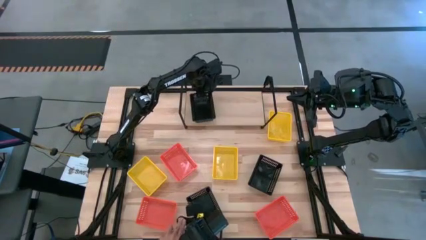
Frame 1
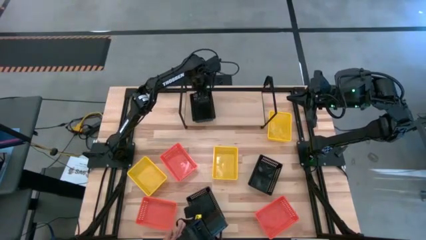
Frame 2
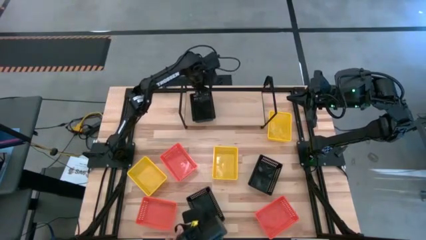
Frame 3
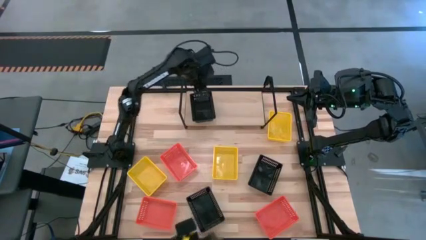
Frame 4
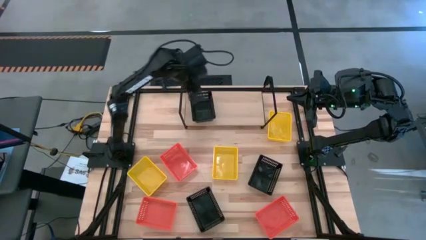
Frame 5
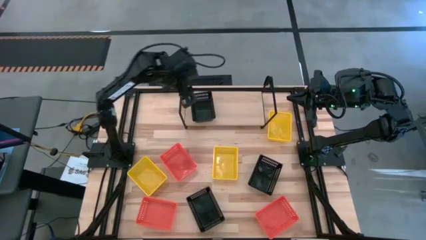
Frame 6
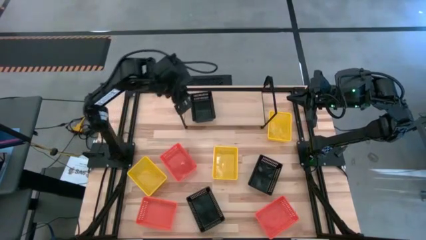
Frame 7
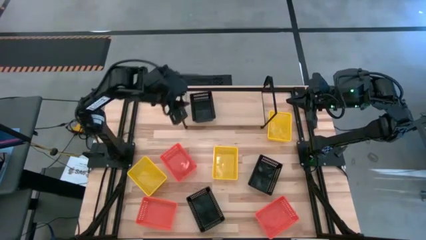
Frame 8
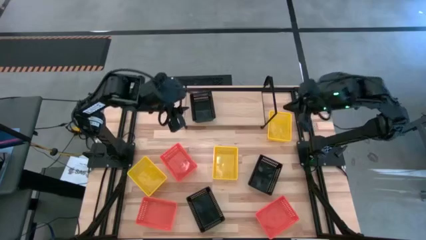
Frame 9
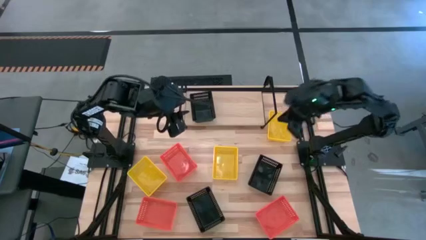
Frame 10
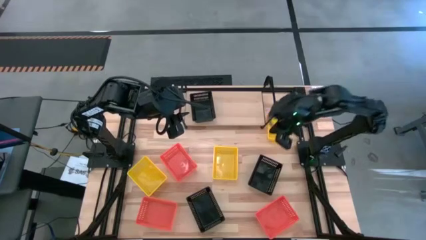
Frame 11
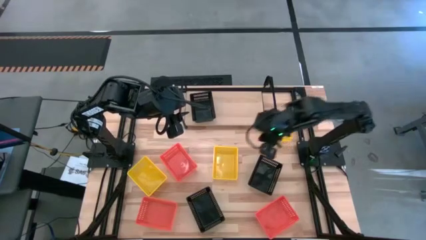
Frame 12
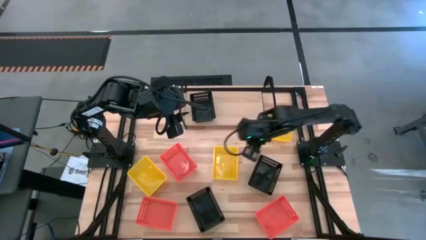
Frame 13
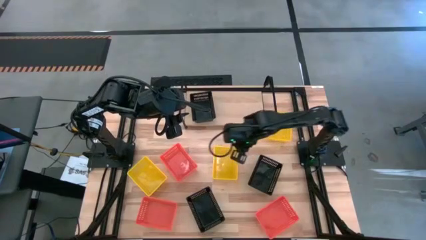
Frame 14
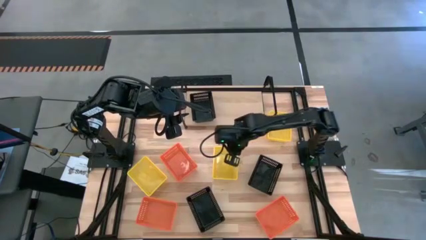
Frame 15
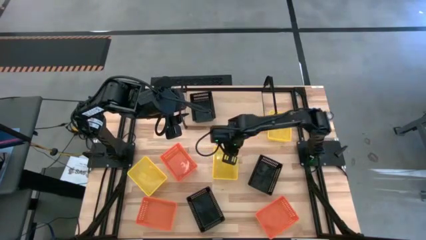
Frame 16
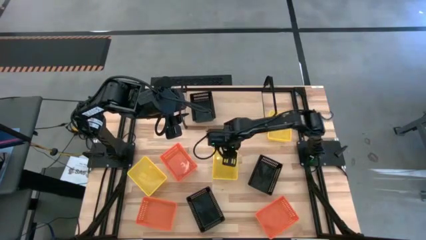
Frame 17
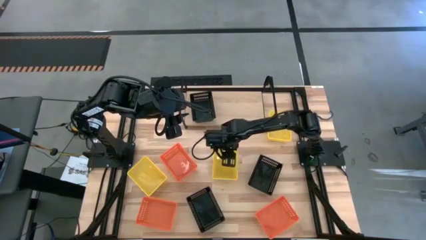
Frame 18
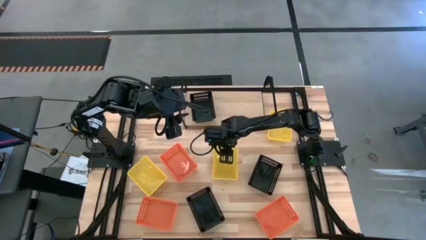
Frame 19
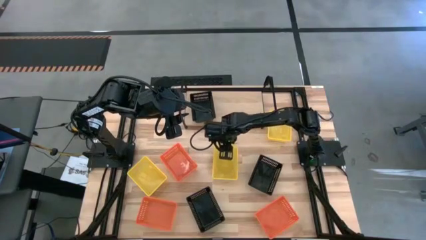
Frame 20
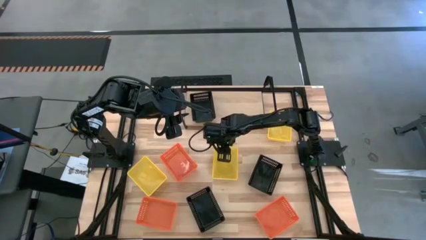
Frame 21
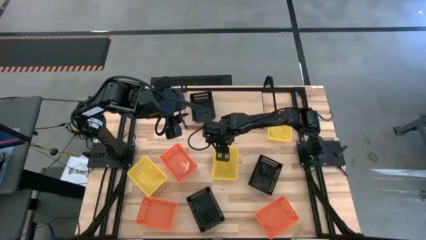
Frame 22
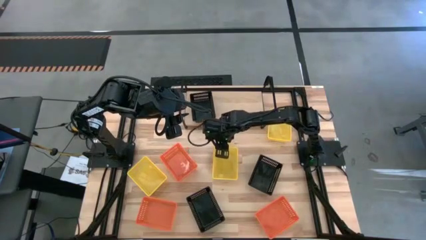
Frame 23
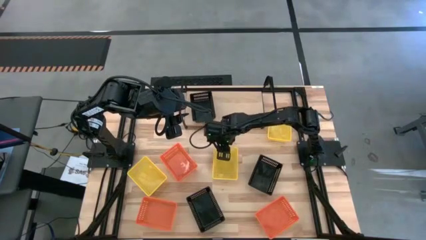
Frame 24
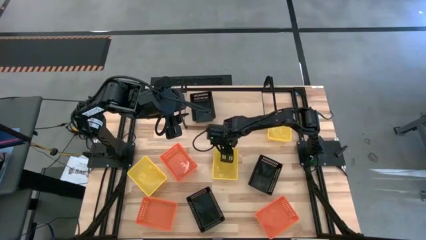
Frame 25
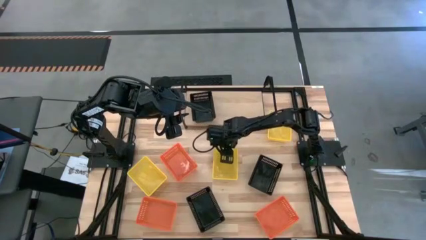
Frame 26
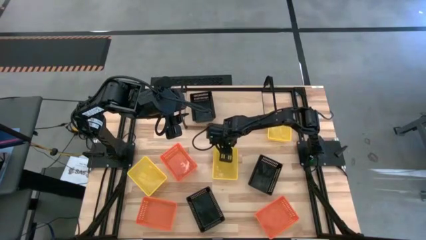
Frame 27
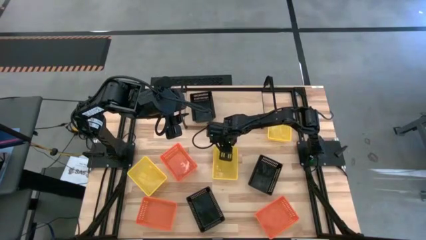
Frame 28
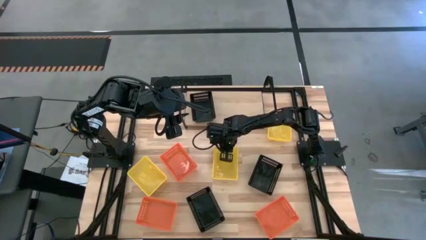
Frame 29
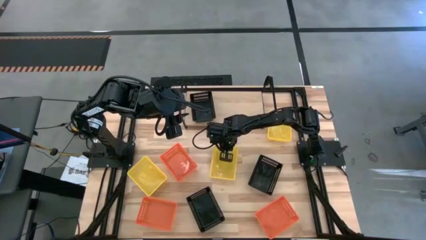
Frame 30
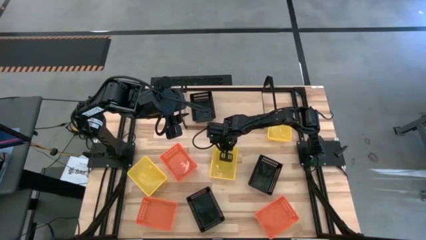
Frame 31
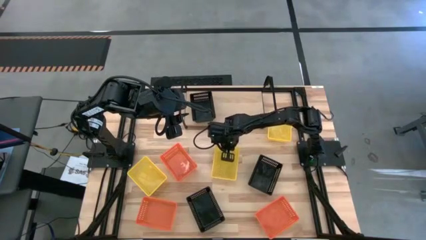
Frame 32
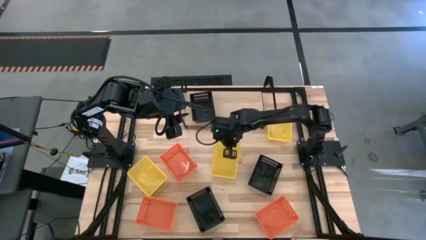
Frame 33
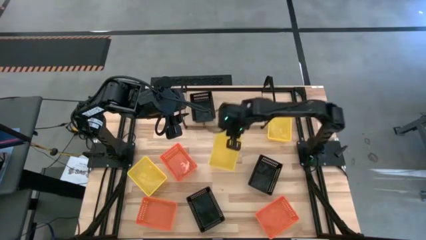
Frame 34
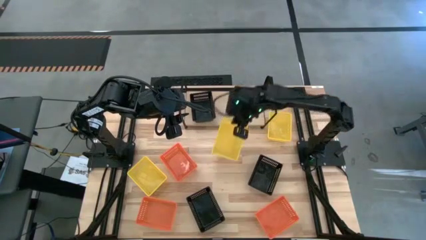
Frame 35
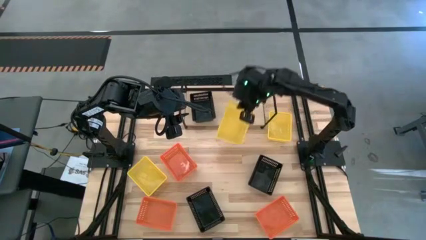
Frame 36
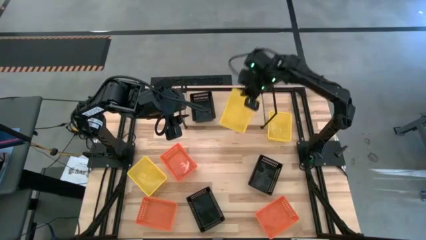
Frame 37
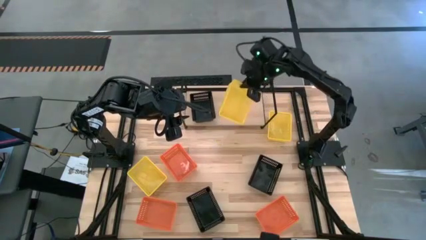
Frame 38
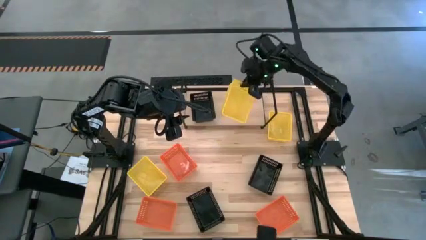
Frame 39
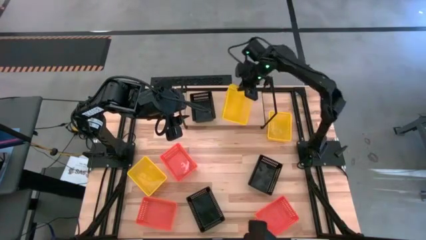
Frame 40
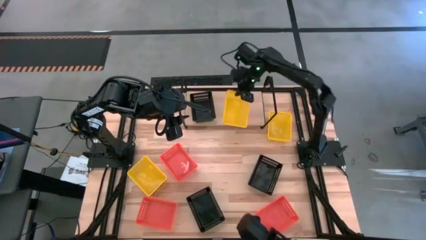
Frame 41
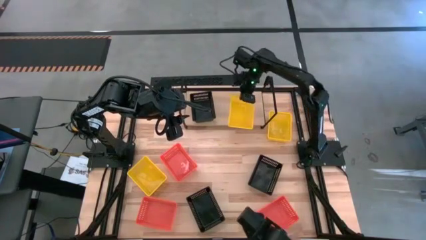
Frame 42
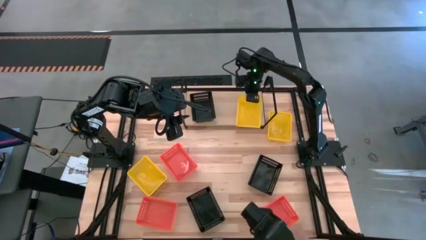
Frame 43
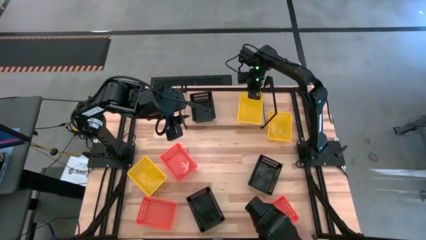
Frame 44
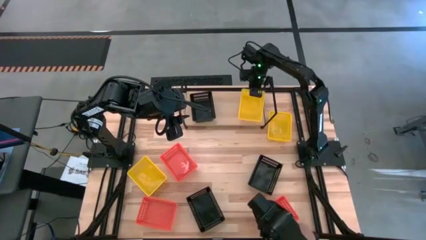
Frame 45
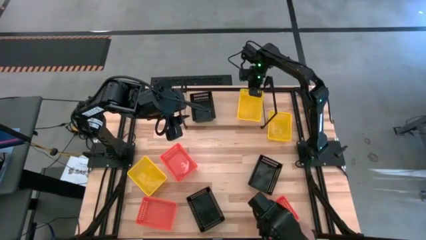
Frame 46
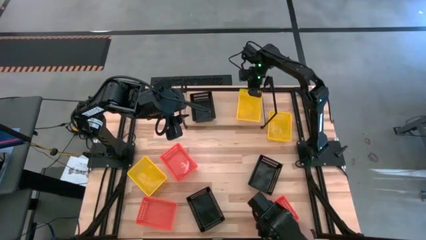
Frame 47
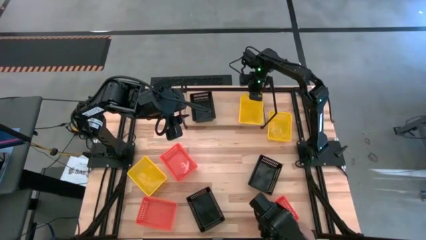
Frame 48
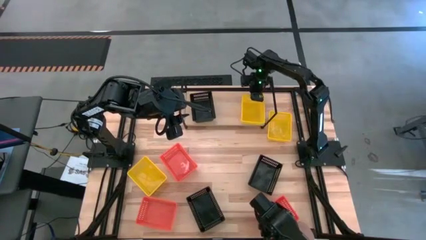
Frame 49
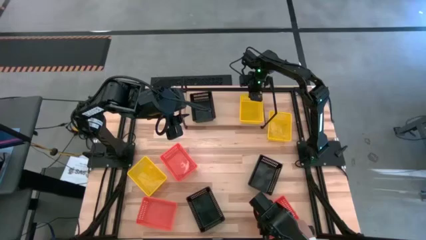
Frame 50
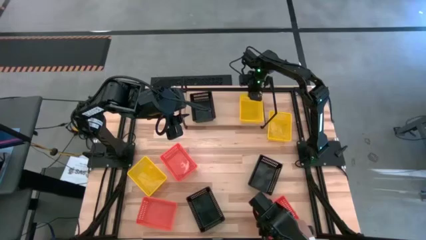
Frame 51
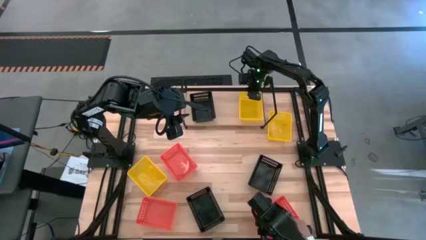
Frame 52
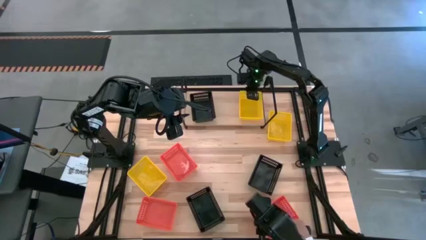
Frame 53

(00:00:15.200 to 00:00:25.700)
Task: Stack baskets on shelf by color
Put the middle yellow bin on the shelf
